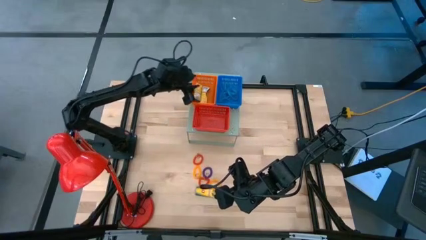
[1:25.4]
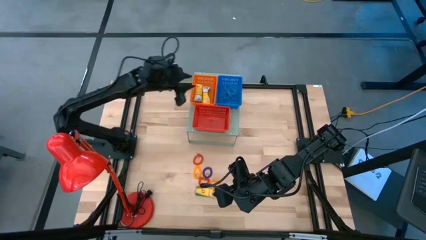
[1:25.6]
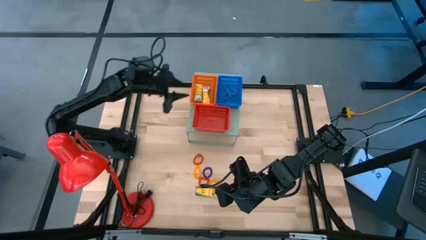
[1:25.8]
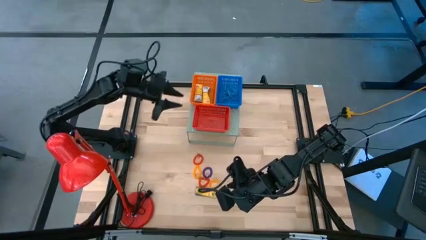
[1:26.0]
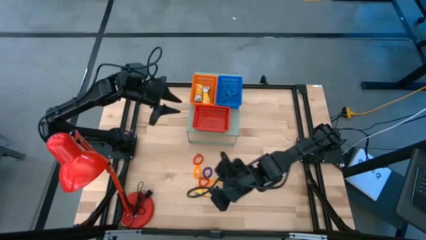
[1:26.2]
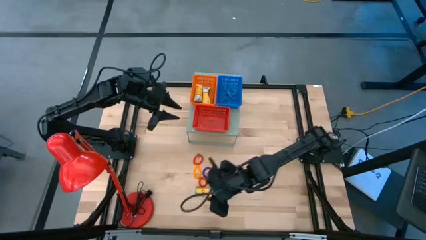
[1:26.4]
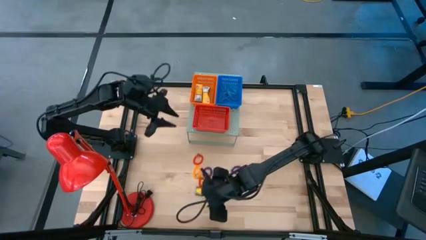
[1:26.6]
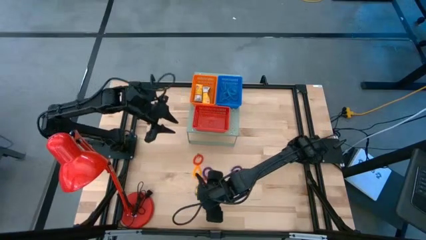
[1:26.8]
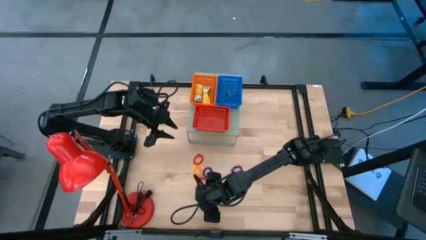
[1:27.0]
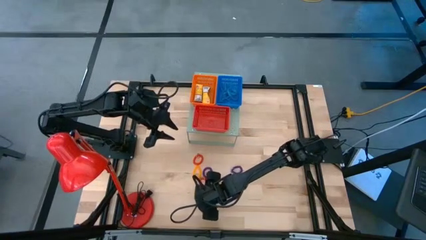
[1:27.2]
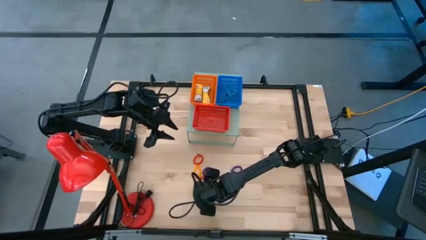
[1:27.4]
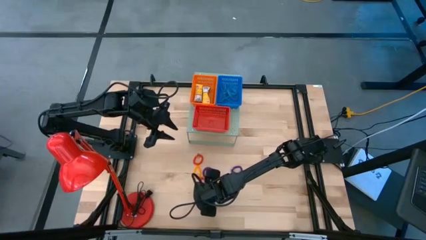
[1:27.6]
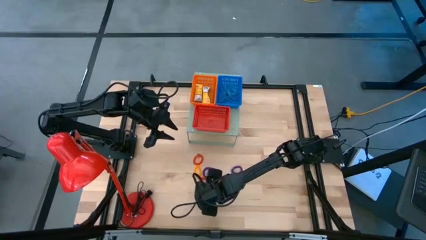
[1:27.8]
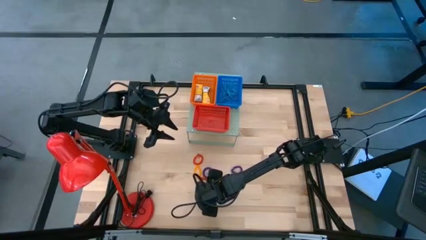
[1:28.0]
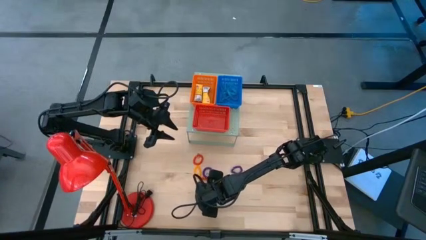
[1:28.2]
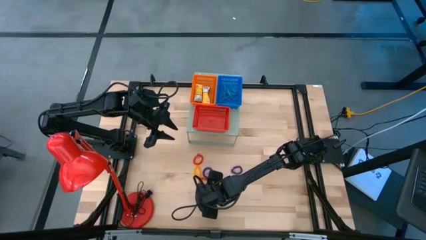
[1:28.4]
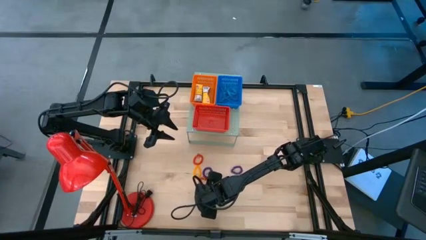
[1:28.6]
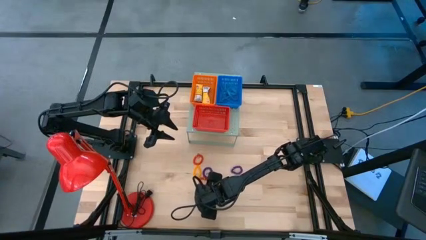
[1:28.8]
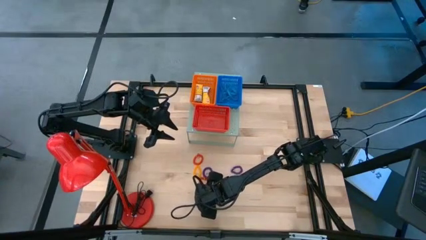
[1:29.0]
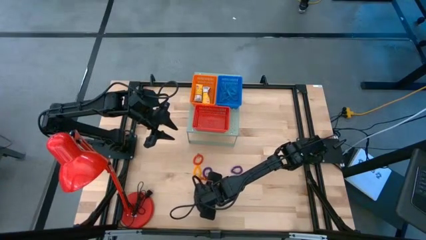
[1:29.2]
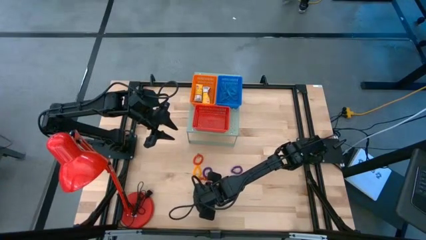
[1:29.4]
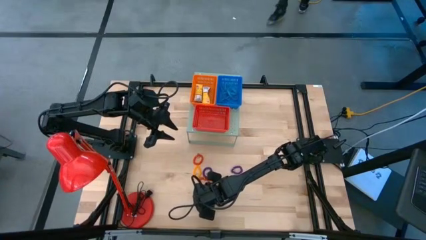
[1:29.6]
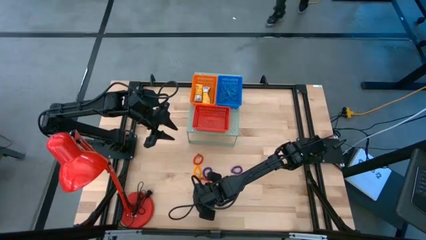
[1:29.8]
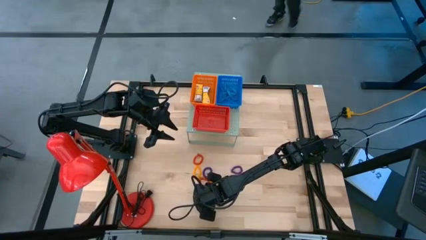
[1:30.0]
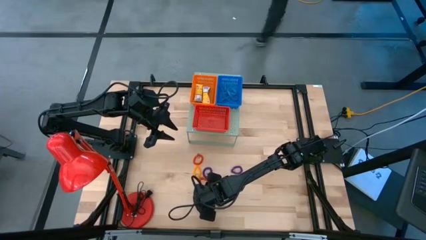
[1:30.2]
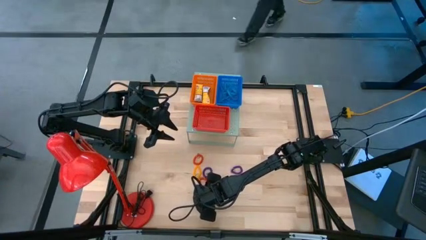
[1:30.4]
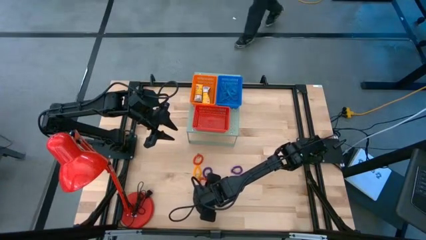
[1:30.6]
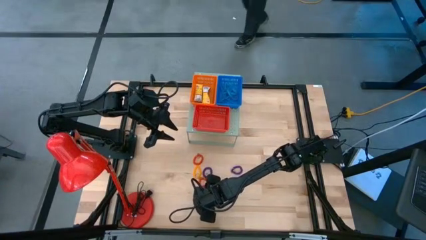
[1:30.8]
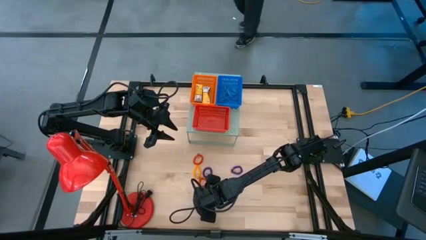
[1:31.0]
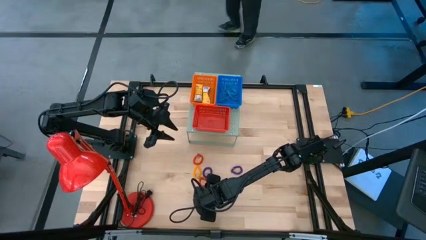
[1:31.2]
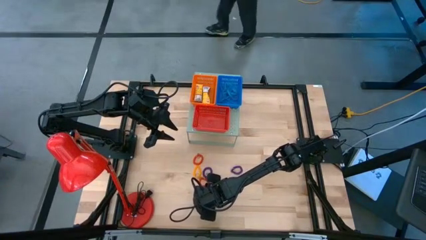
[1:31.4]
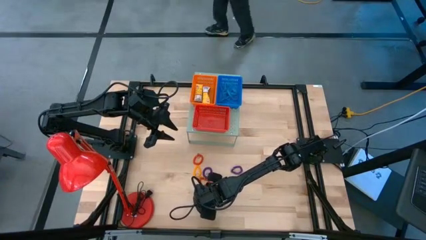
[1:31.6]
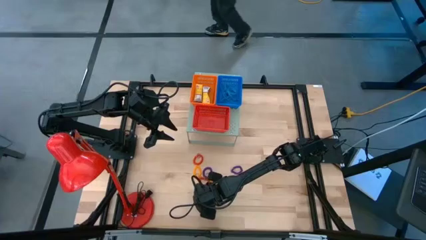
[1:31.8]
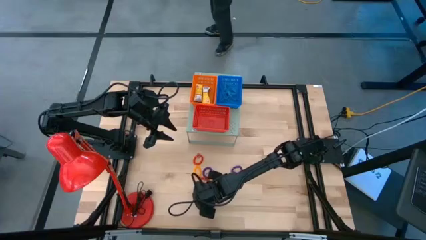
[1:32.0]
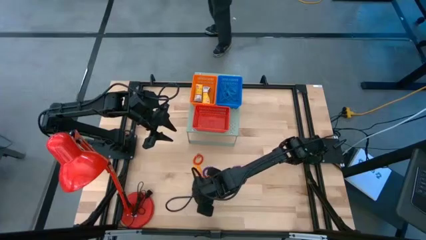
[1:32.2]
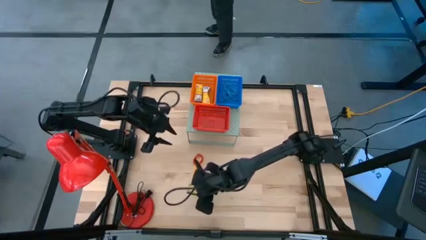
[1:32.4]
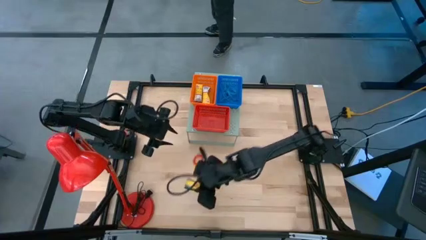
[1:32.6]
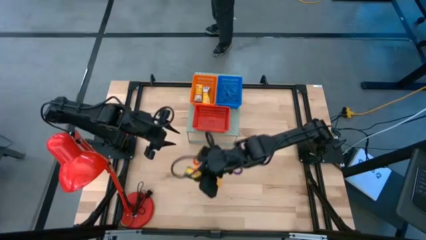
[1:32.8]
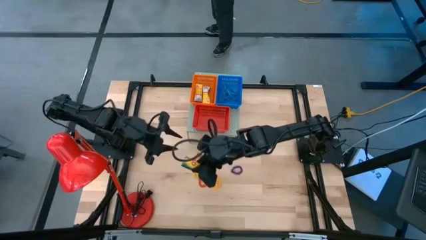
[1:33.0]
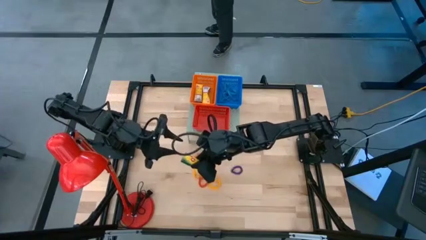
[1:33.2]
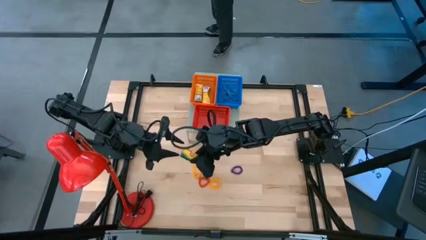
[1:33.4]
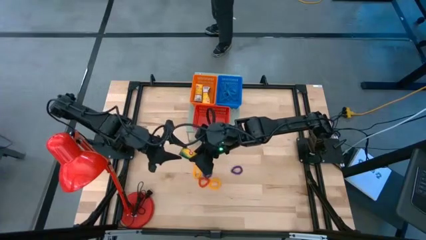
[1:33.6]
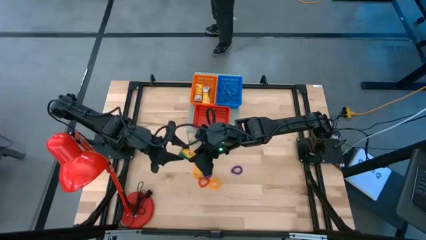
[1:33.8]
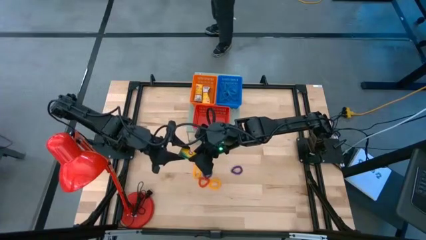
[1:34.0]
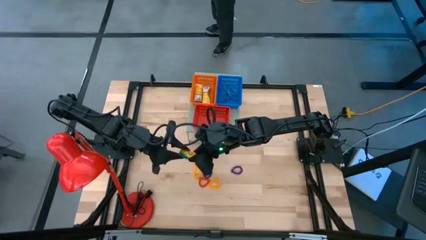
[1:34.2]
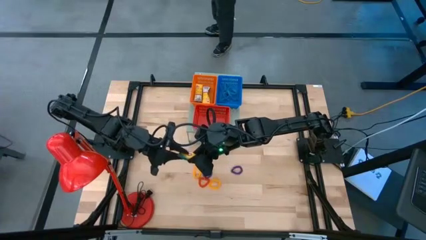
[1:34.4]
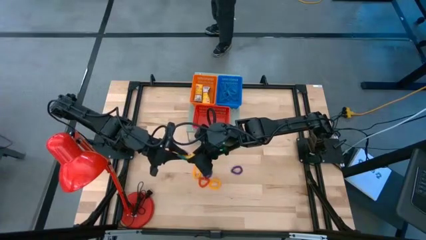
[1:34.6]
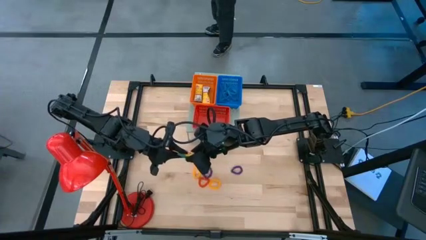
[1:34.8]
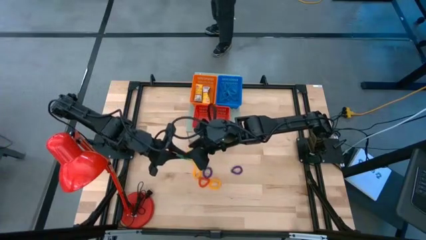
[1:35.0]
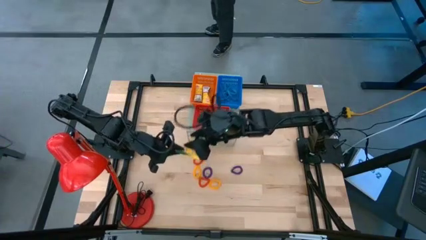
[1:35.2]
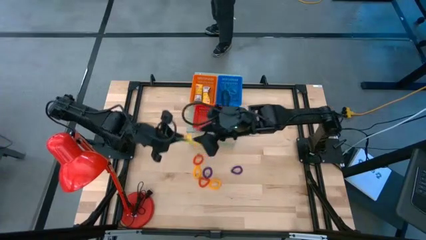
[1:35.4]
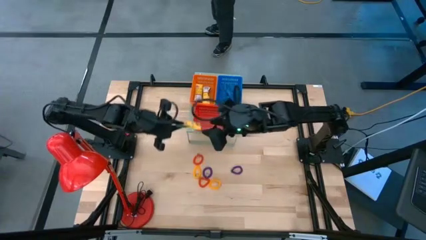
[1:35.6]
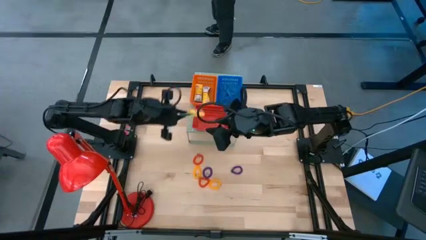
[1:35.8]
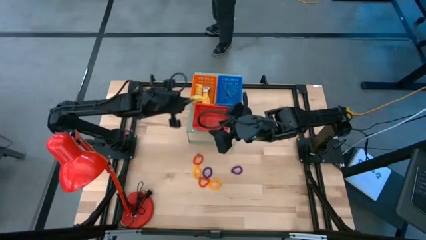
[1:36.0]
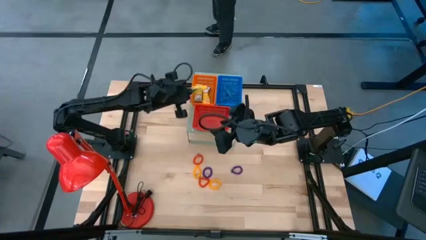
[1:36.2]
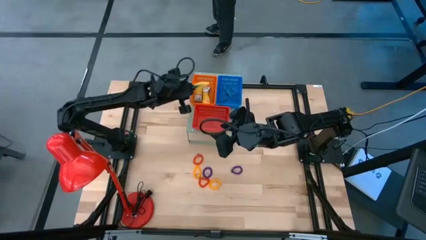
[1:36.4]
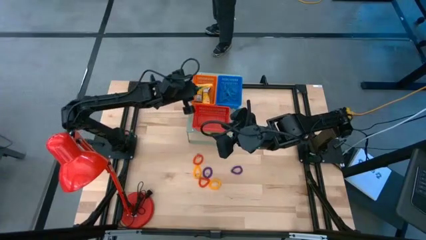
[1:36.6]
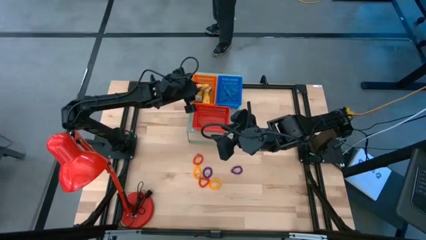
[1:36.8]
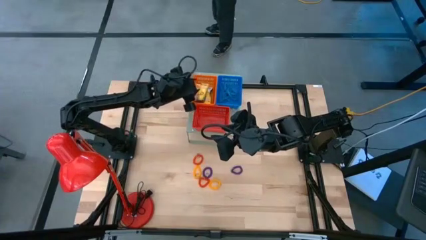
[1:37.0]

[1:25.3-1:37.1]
Task: Pick & Place Office Desk Supplies
Put the yellow crayon box into the orange bin
